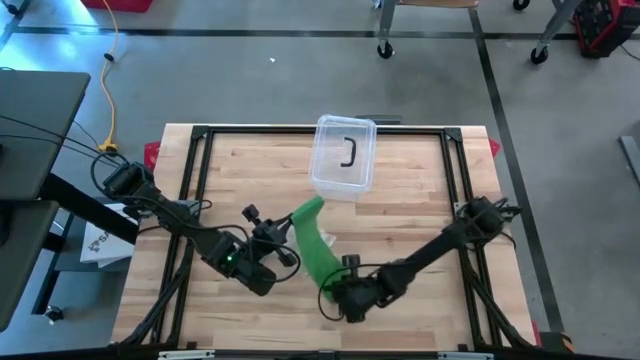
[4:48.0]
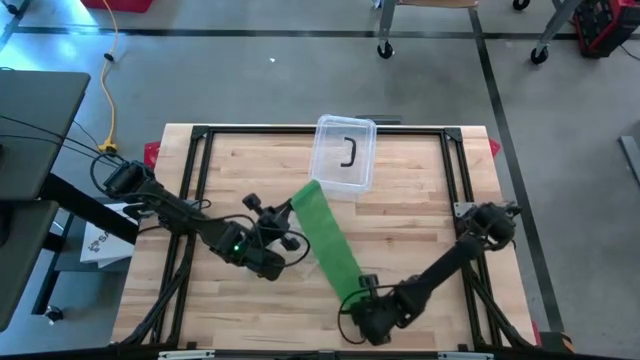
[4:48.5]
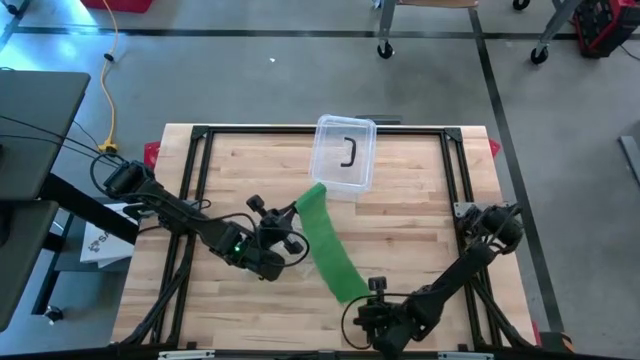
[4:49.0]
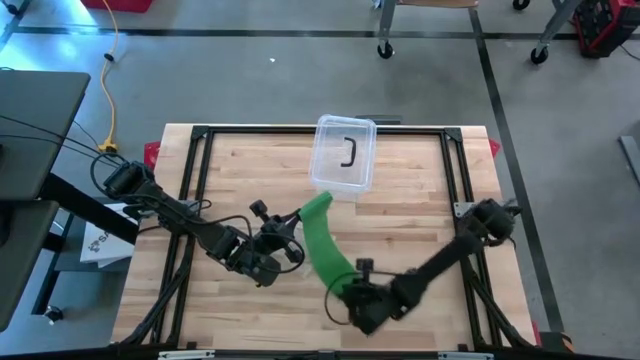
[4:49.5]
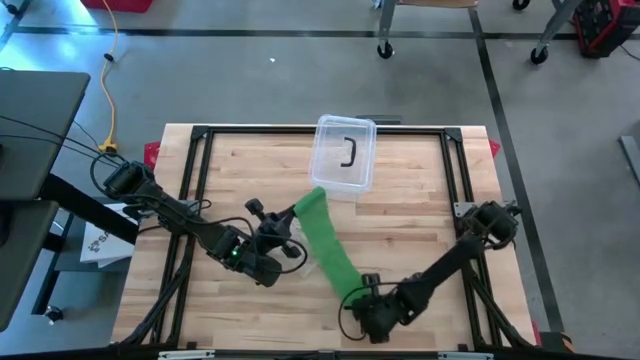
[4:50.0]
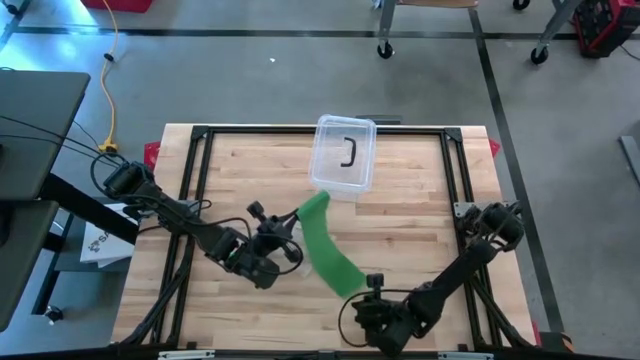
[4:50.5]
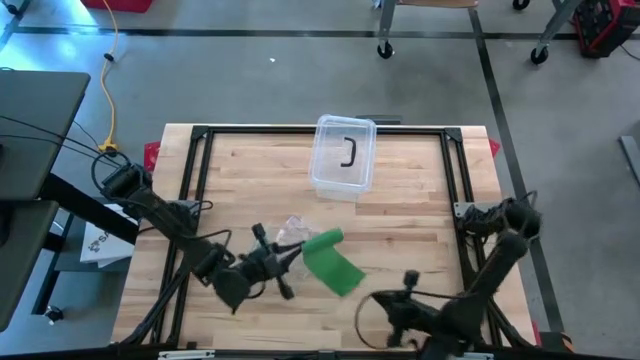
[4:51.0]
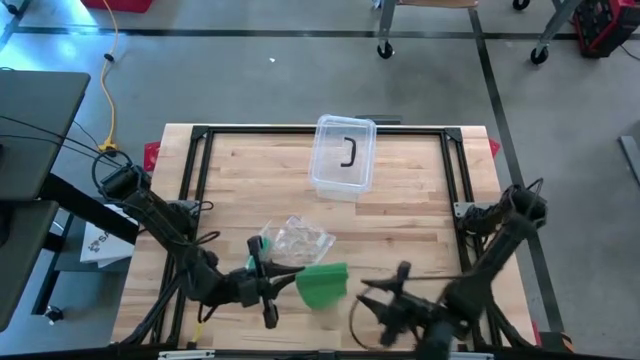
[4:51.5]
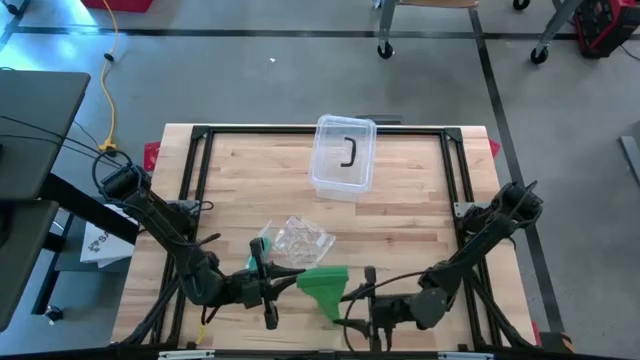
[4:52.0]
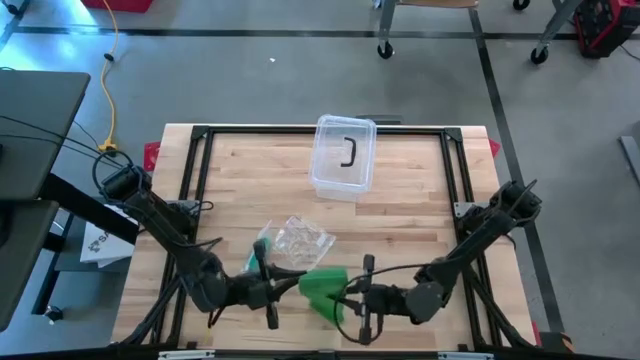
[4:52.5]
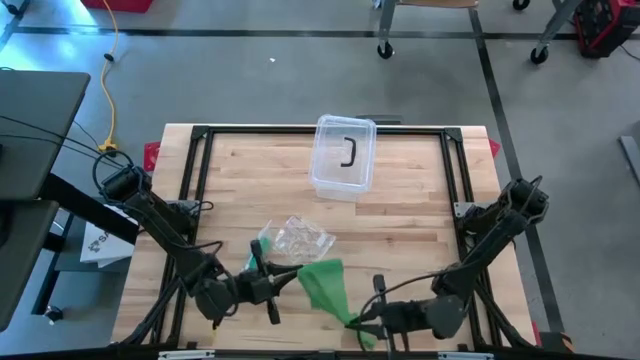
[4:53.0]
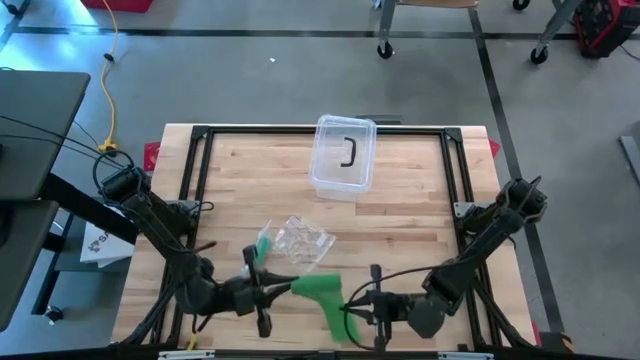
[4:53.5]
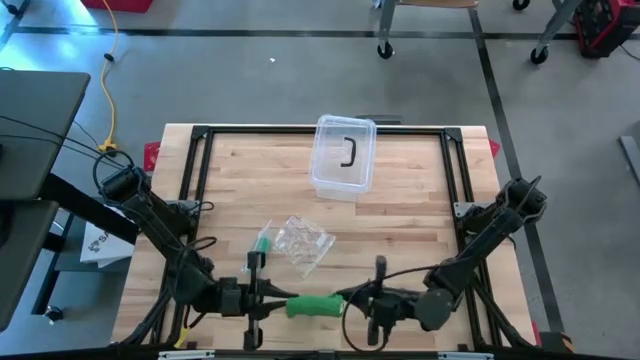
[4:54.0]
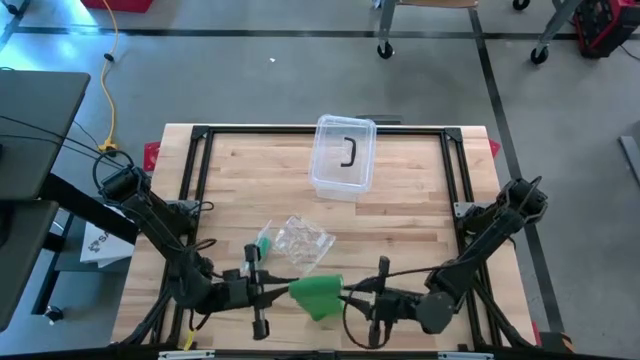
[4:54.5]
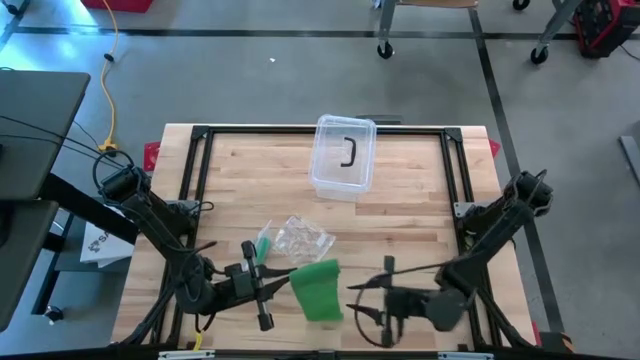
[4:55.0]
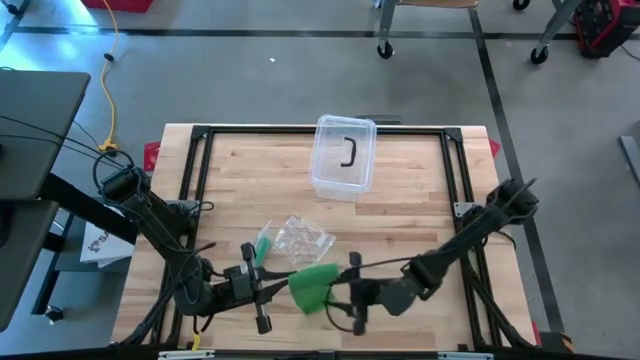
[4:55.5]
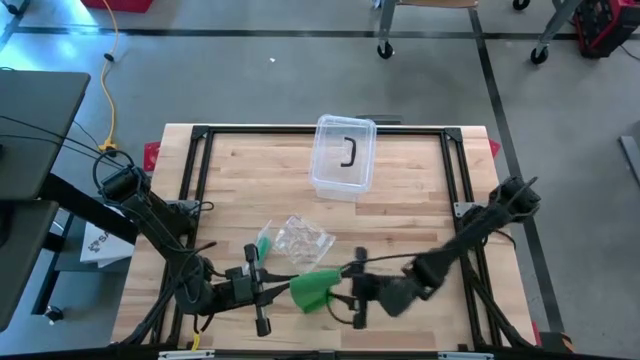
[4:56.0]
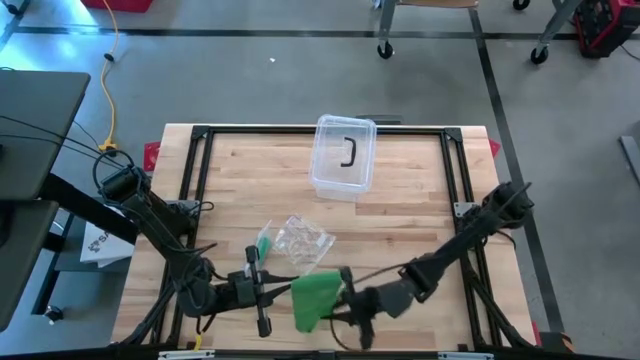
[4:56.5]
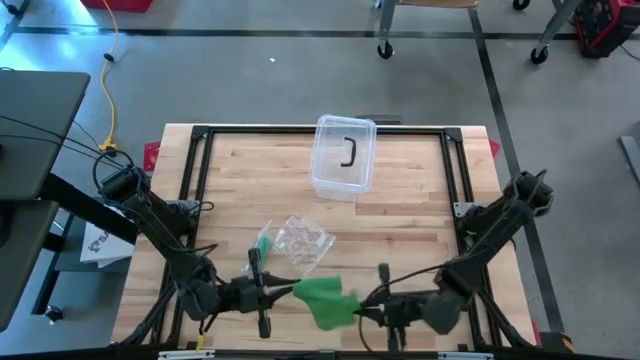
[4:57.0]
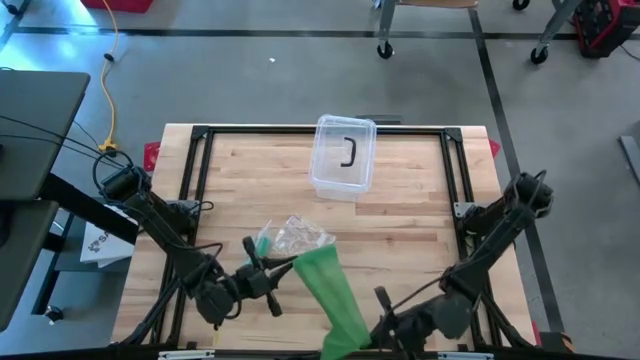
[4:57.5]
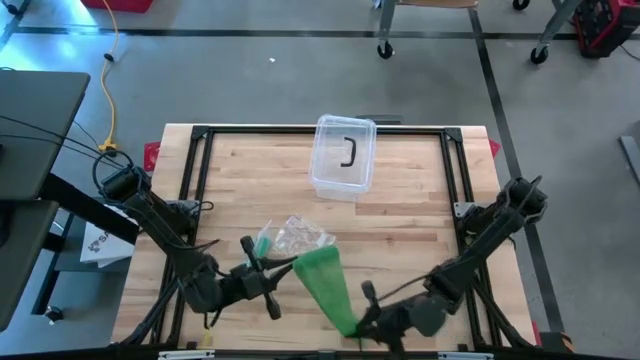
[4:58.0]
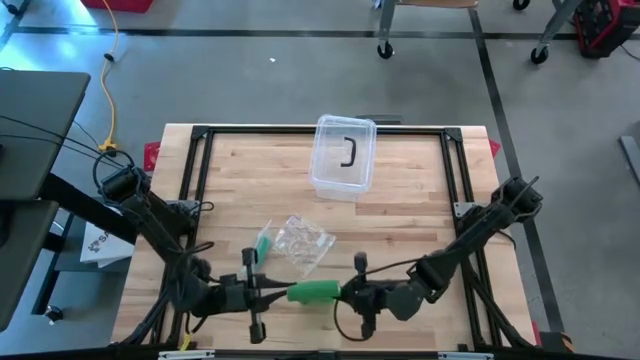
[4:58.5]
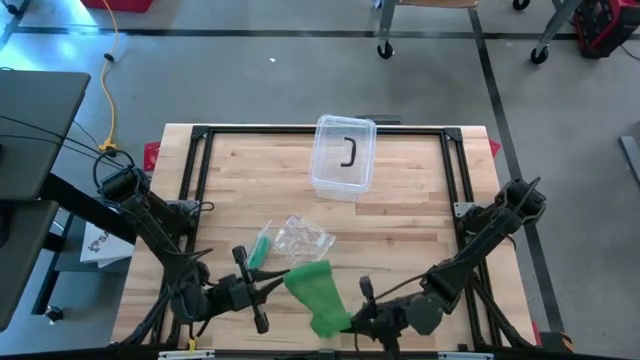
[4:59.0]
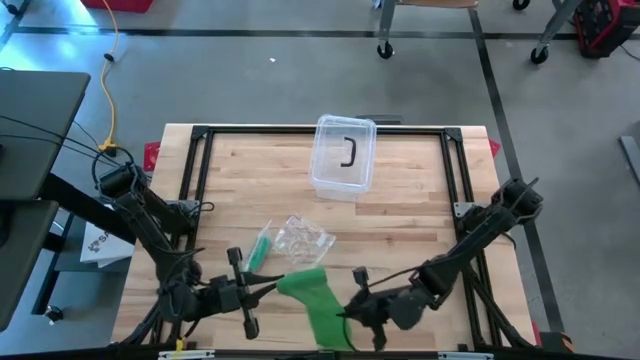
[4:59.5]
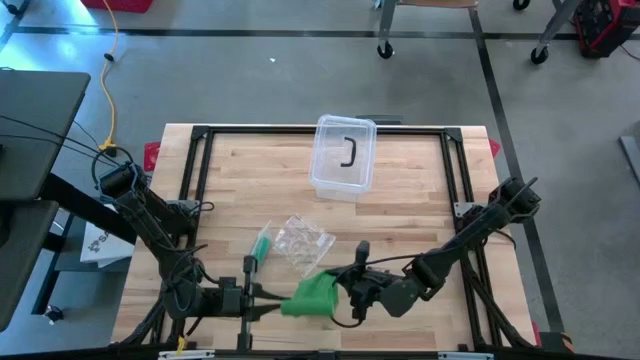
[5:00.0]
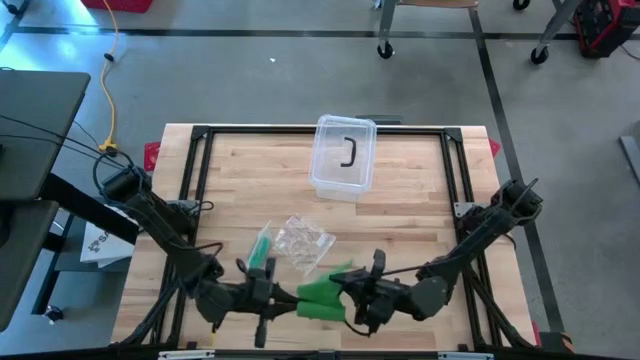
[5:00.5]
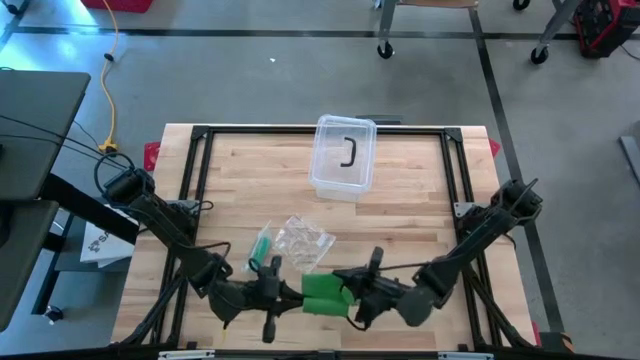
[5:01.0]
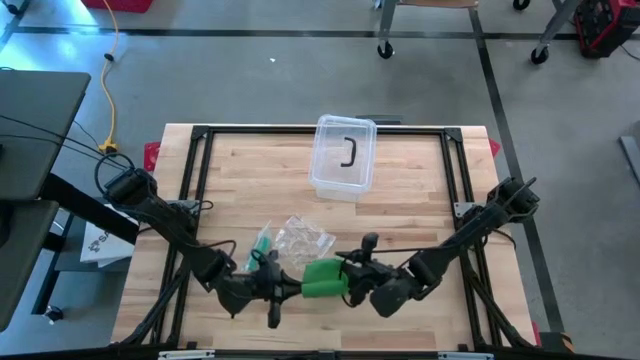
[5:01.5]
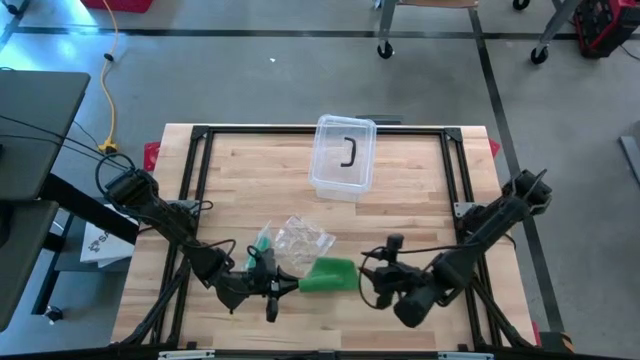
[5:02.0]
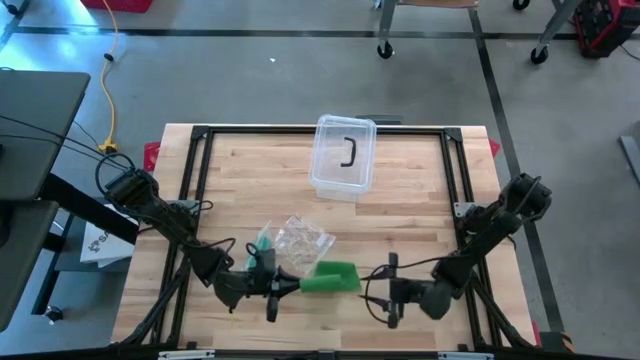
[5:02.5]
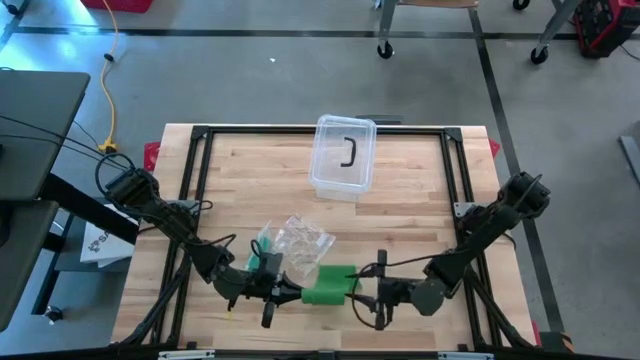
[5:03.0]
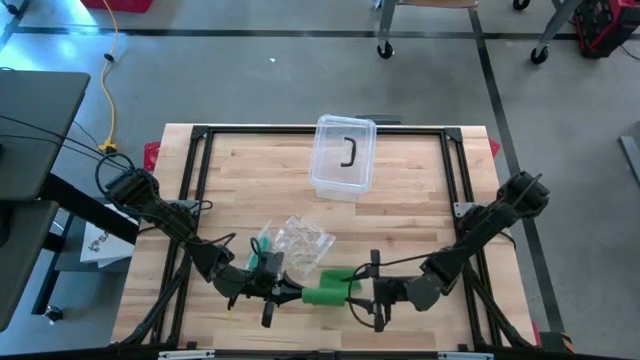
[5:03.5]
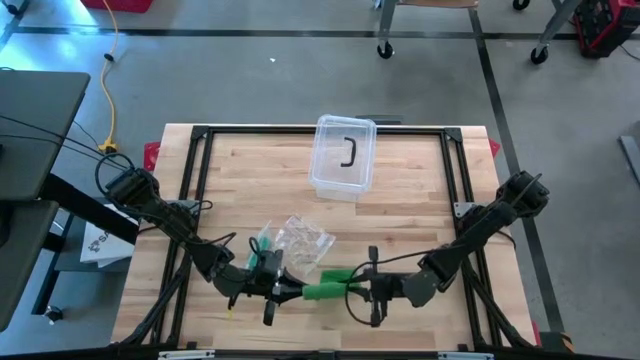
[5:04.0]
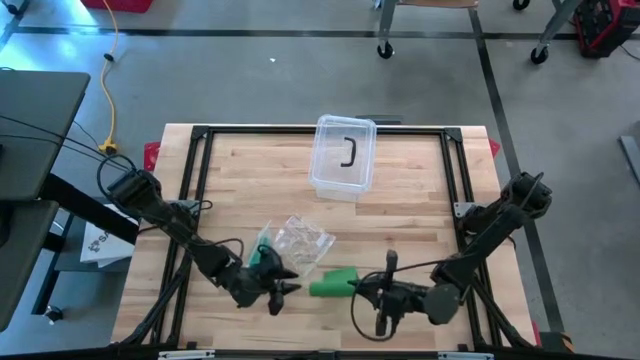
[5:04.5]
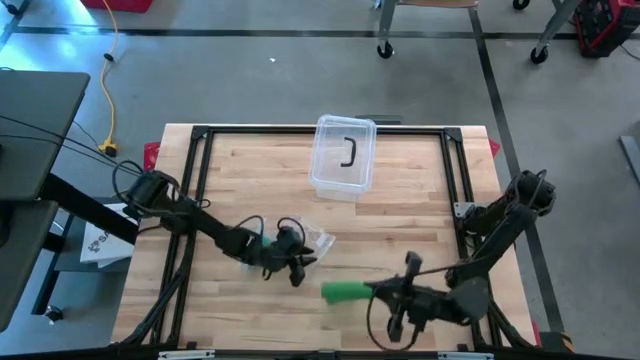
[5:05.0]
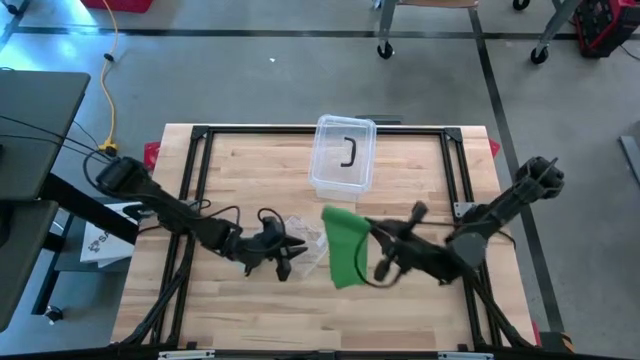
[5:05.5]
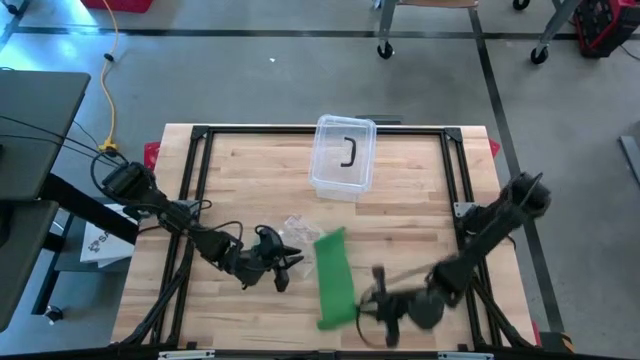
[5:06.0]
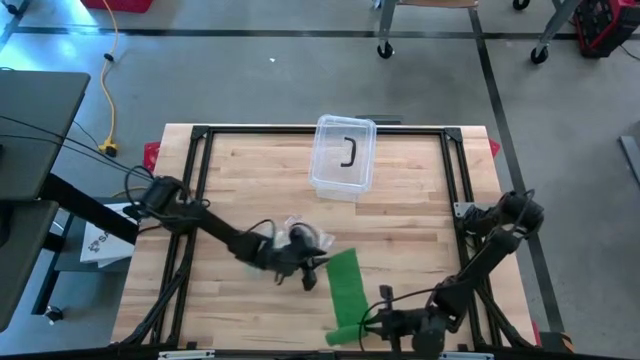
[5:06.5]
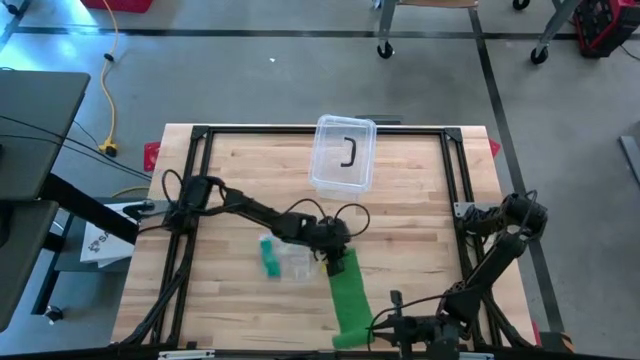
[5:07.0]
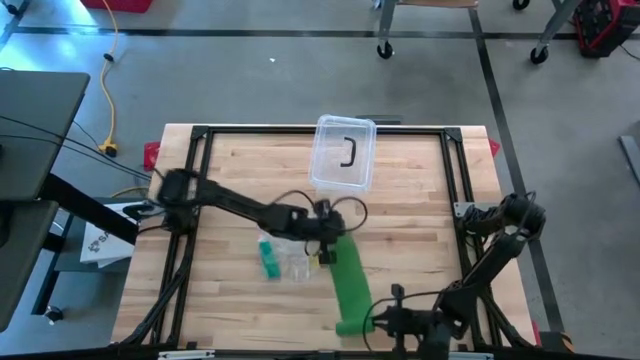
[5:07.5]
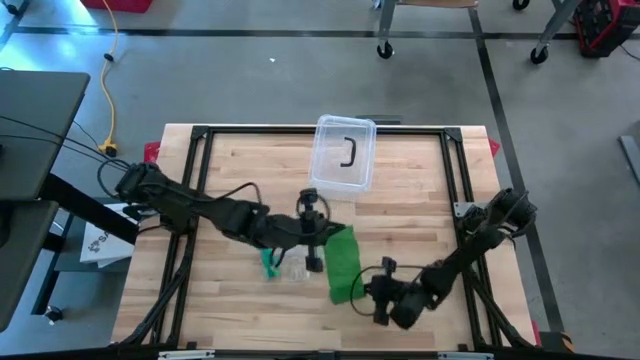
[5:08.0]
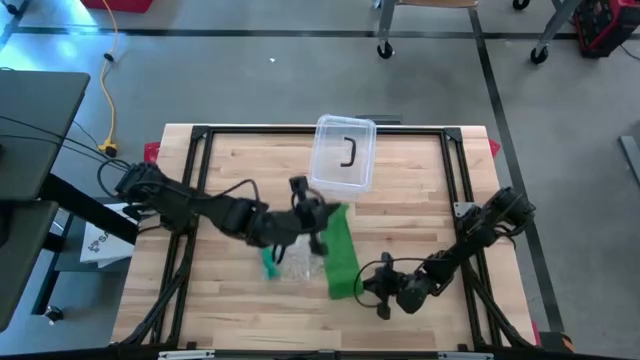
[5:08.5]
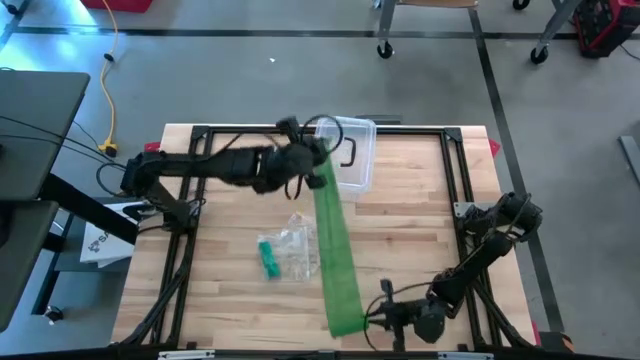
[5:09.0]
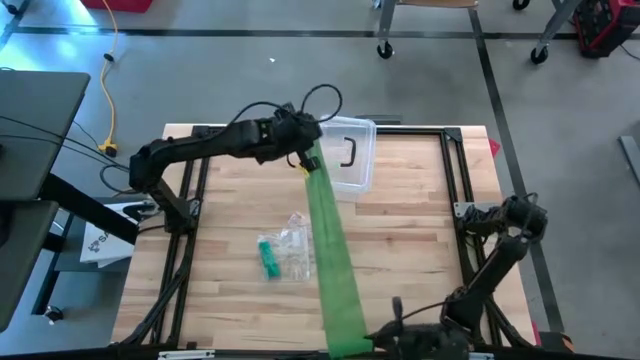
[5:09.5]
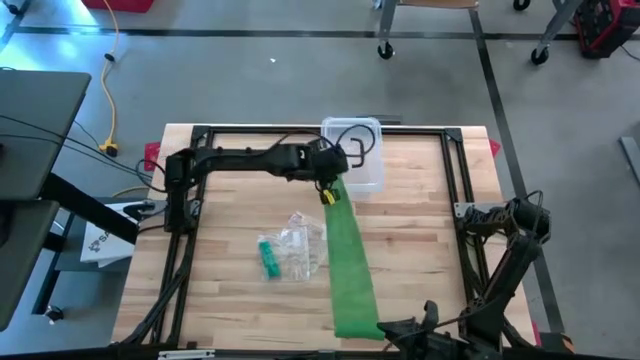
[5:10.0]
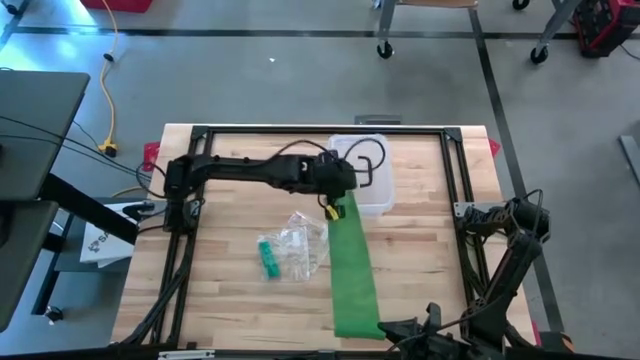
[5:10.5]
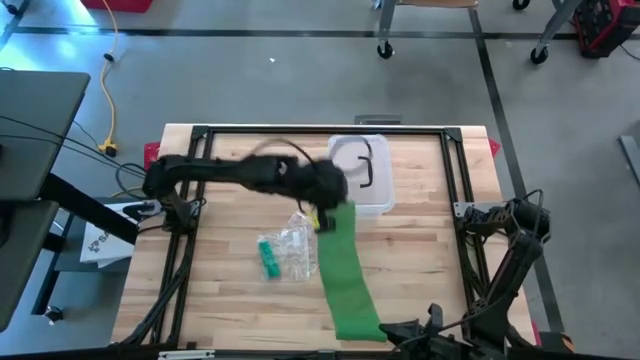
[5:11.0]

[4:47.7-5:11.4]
Task: Roll bandage
Roll the green bandage
